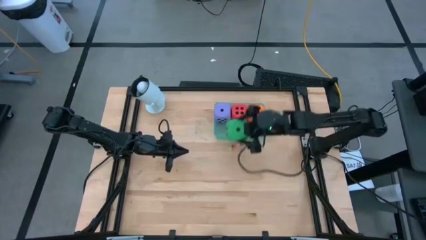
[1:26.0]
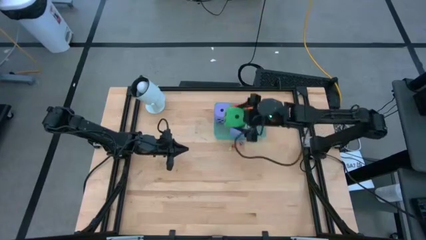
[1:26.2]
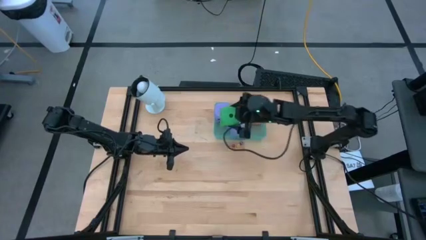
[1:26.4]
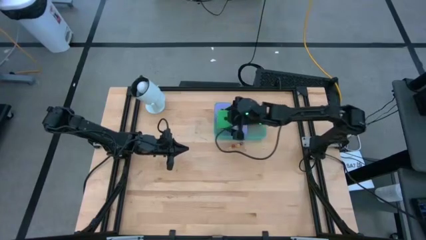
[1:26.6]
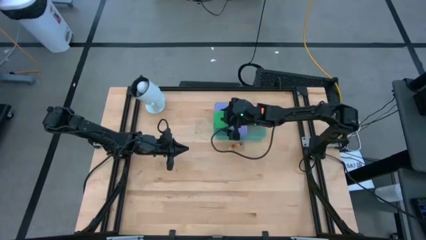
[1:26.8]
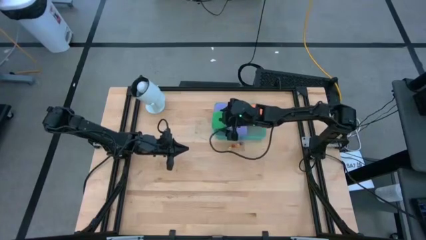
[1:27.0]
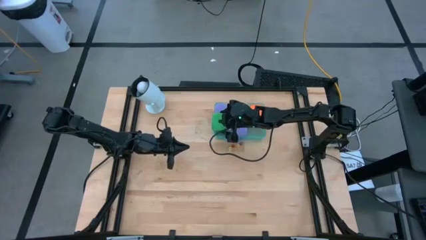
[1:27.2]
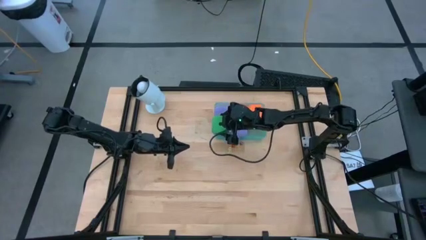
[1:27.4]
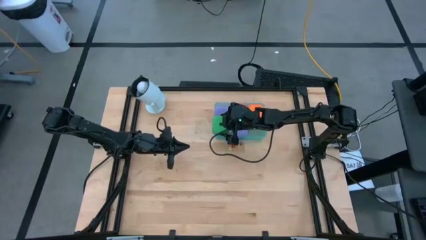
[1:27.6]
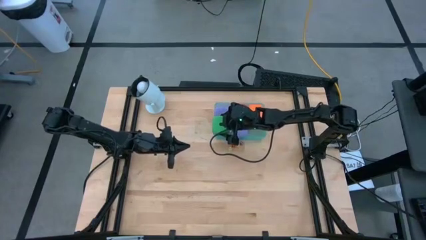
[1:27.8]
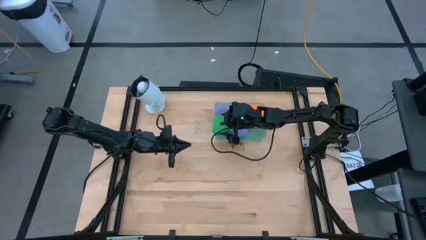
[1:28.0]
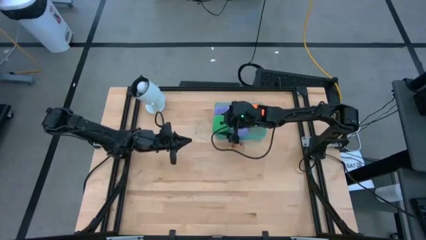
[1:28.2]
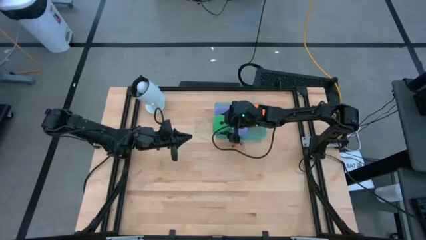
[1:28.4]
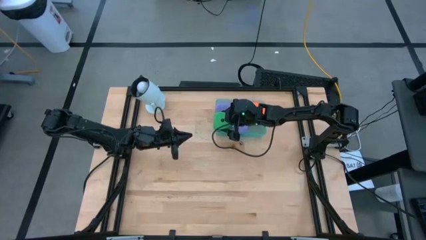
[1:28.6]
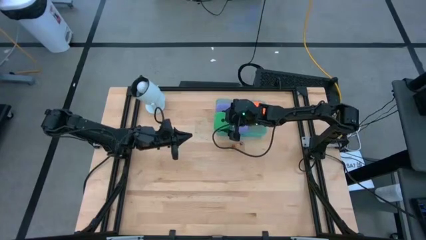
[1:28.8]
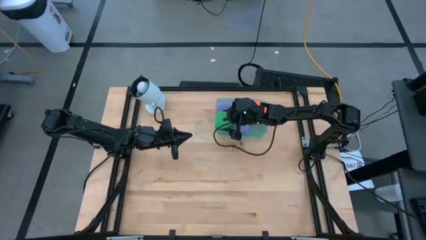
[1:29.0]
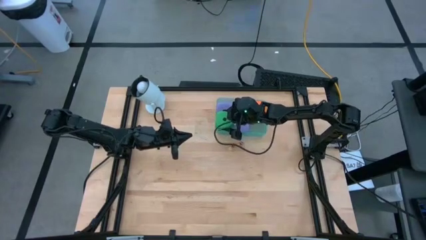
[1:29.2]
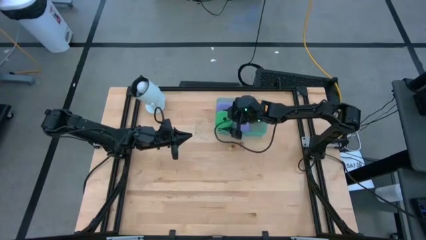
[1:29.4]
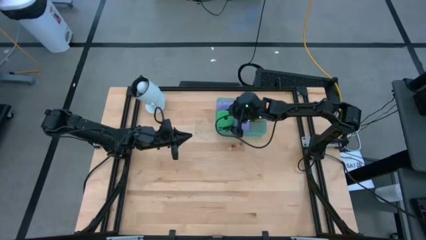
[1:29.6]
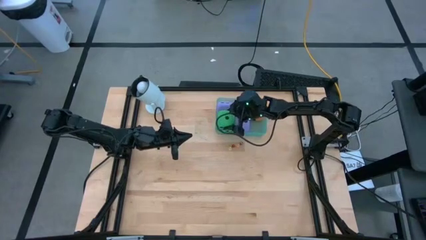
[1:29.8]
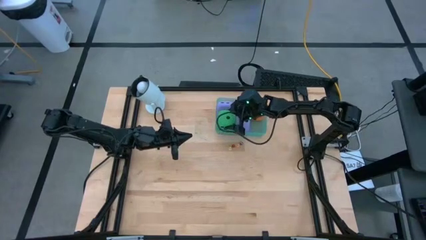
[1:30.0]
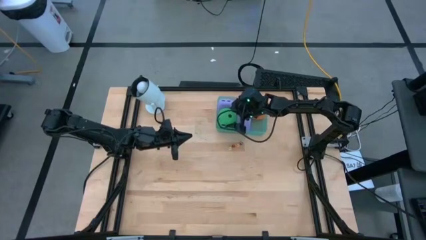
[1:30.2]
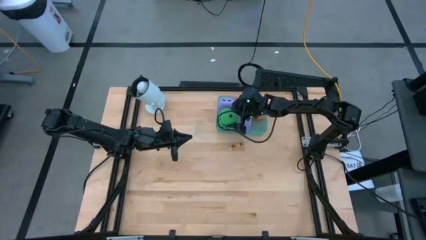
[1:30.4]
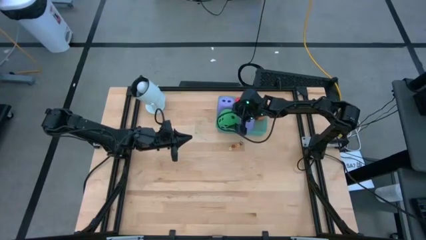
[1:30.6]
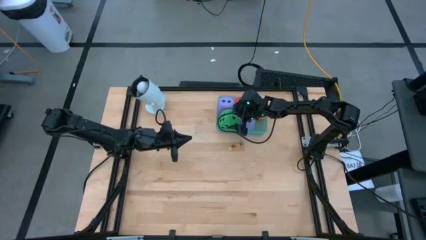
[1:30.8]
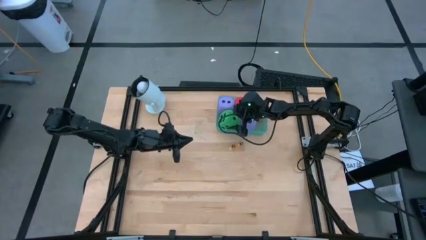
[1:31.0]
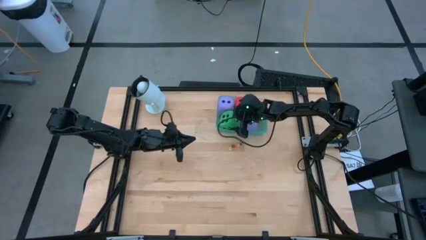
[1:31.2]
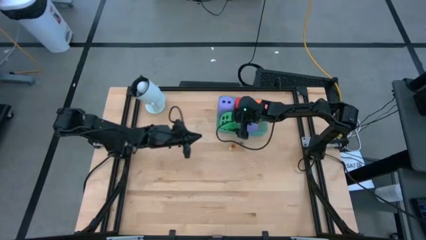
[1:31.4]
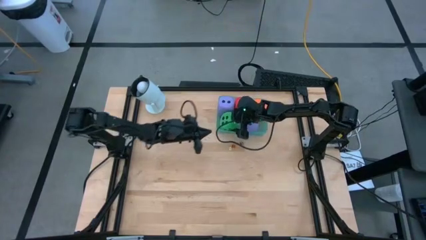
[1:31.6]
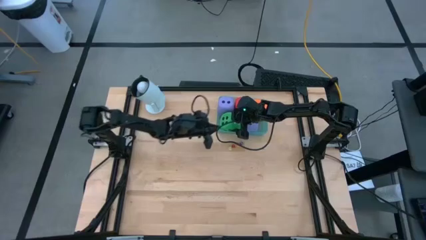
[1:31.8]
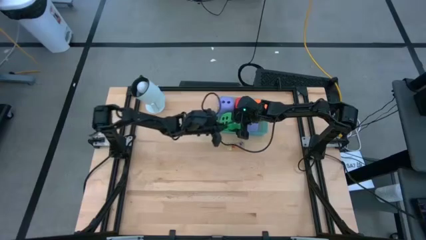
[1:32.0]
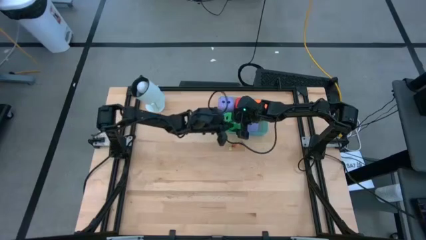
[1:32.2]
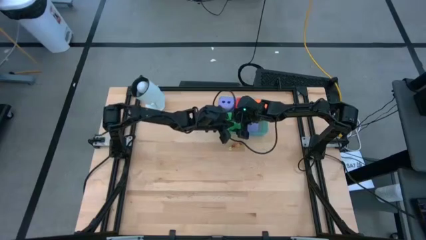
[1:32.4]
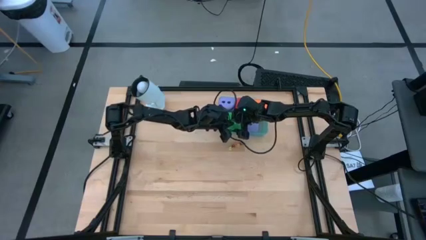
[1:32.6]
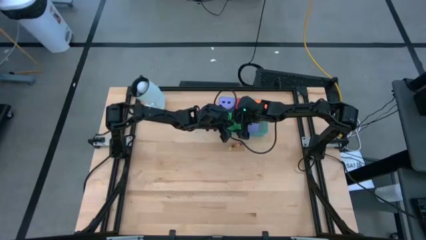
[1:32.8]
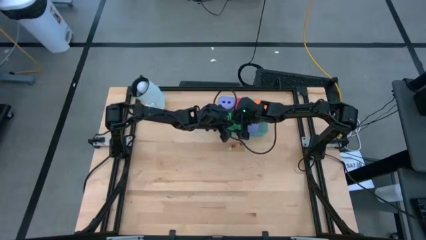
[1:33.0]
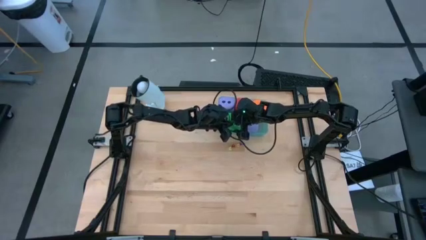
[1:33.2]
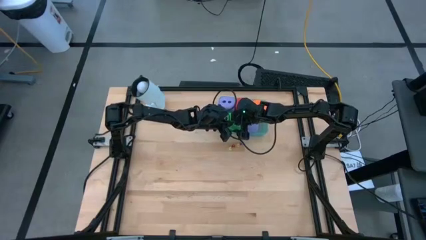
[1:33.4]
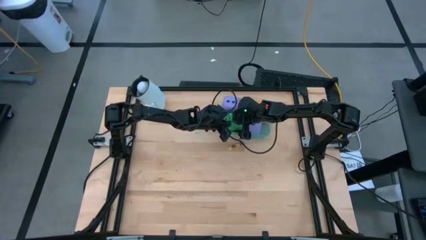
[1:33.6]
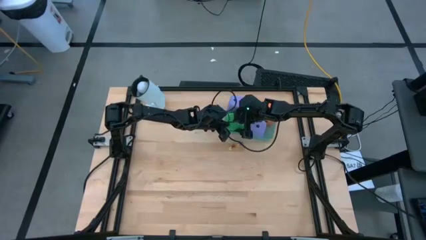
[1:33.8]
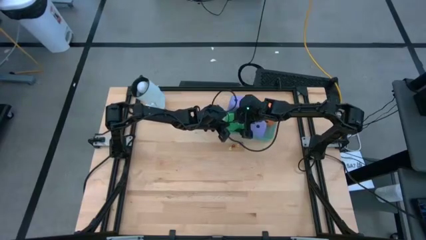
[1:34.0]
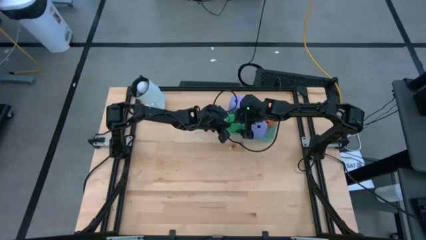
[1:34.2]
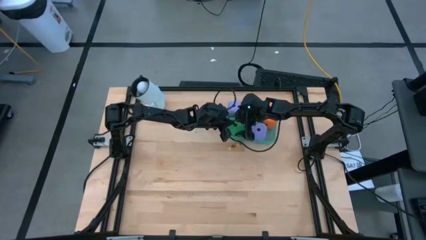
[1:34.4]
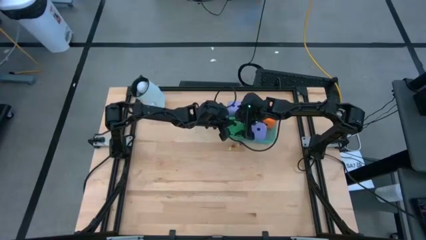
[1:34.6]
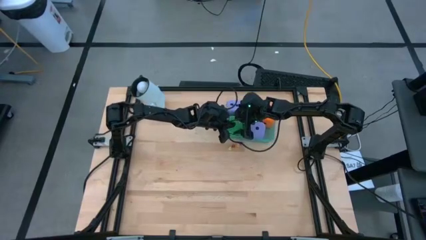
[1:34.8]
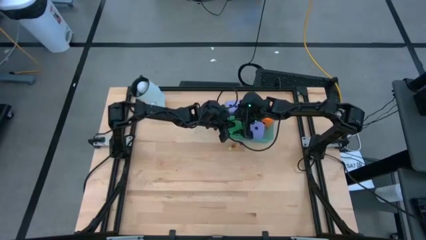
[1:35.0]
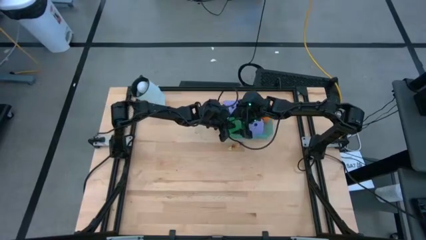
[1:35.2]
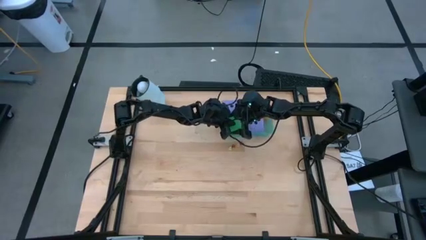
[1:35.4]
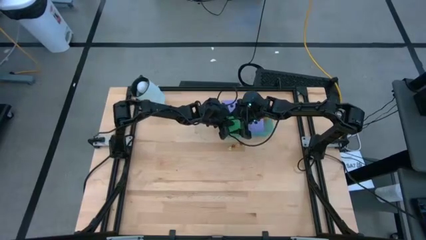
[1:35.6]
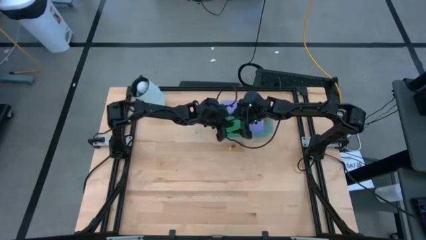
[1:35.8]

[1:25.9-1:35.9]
Task: Pick & Place Dice
Put the big green dice into the transparent blue bin

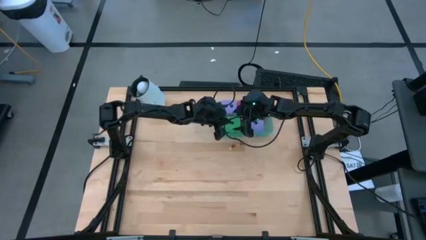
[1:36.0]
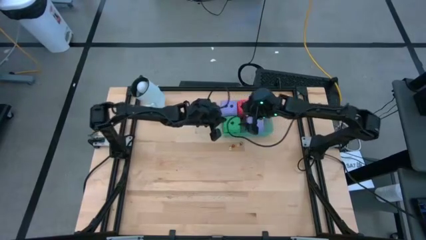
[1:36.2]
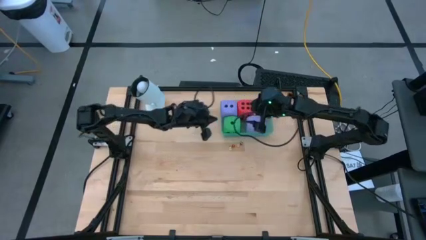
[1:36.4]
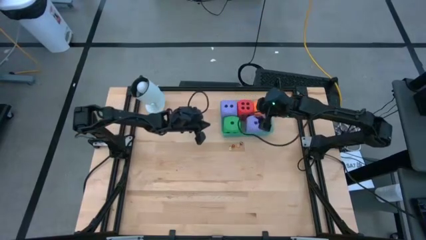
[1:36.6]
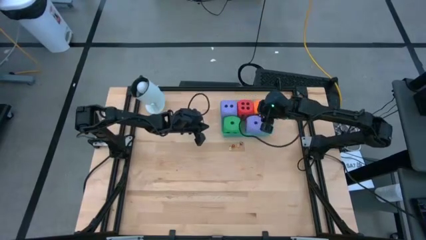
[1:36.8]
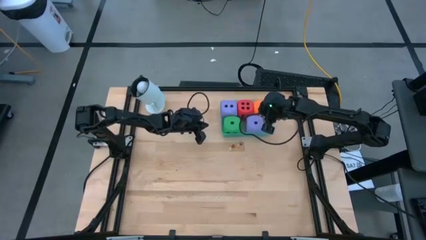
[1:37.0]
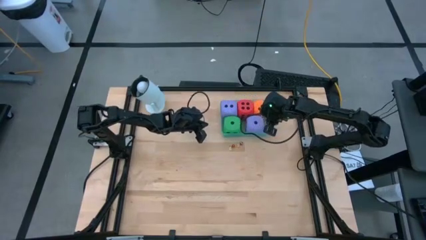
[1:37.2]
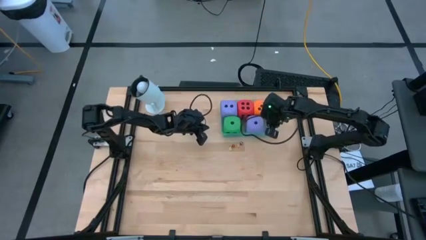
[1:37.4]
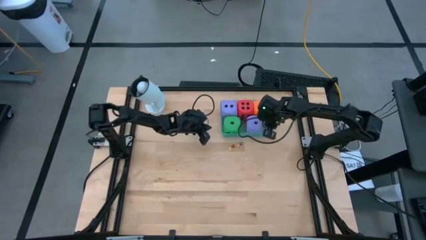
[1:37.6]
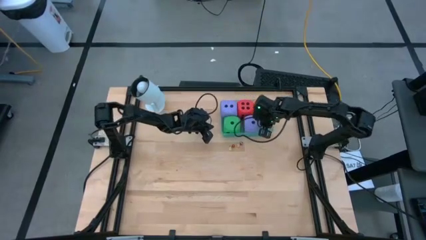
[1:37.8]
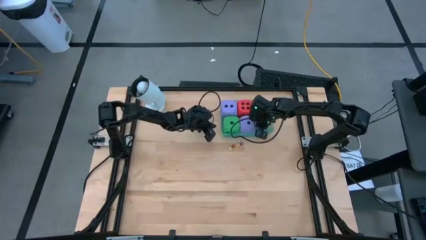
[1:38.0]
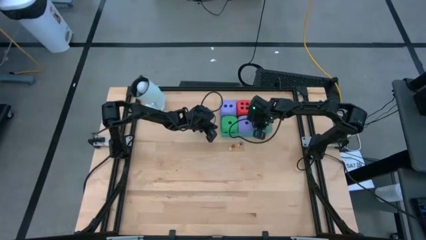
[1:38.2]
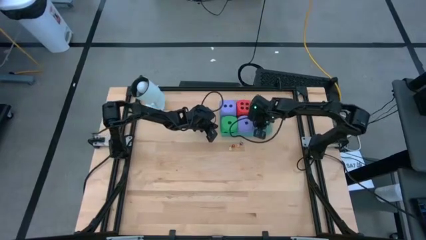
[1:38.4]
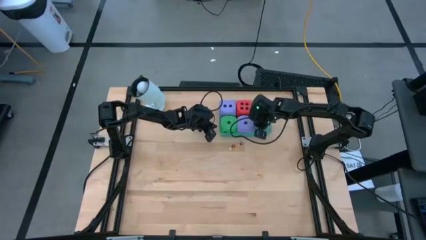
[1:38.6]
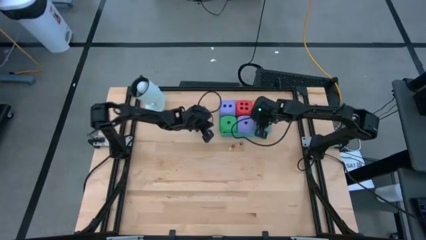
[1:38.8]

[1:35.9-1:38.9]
Adjust the big violet dice and transparent blue bin

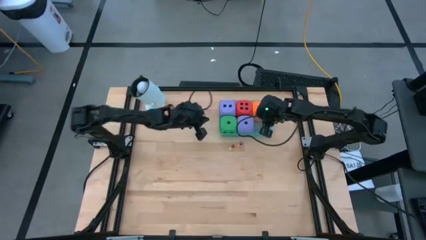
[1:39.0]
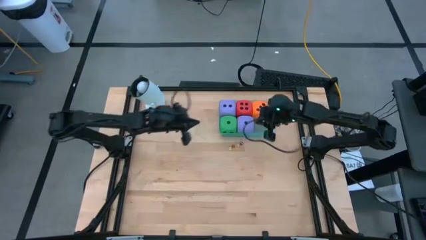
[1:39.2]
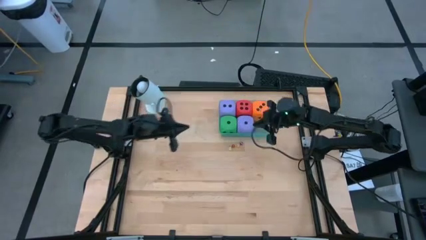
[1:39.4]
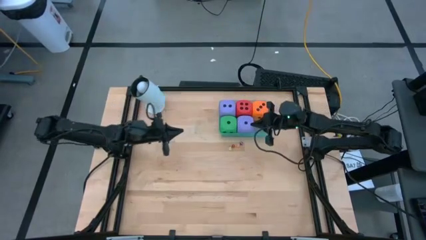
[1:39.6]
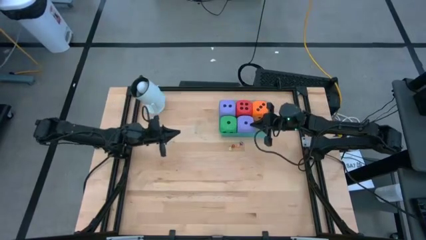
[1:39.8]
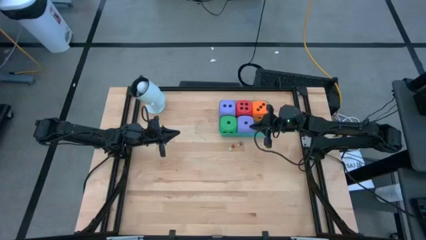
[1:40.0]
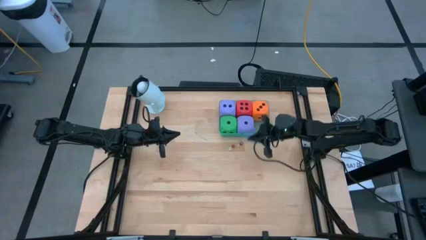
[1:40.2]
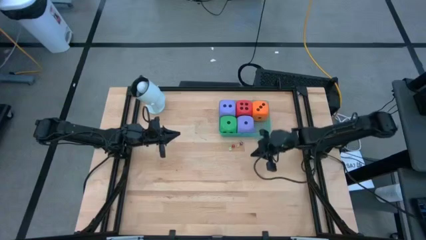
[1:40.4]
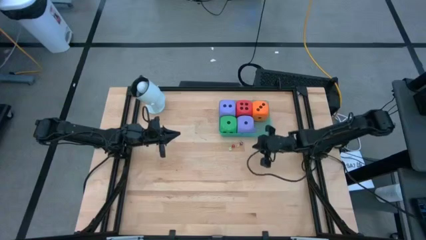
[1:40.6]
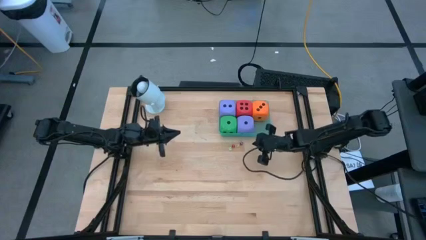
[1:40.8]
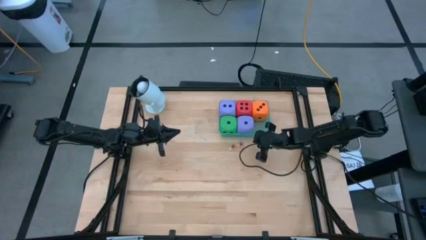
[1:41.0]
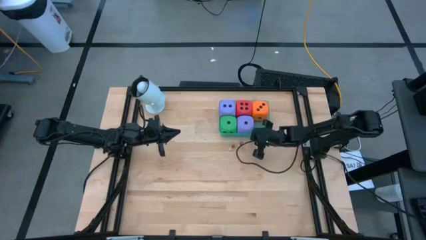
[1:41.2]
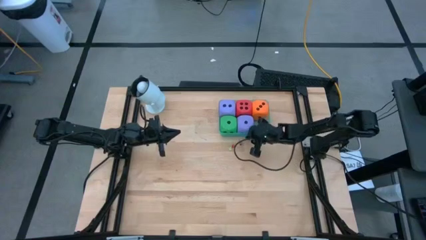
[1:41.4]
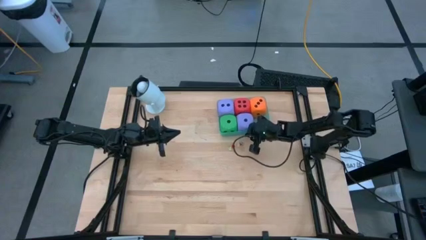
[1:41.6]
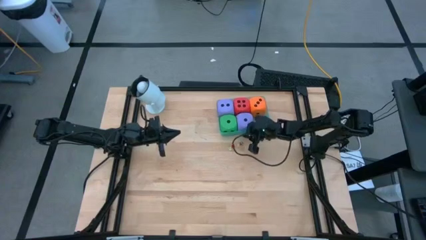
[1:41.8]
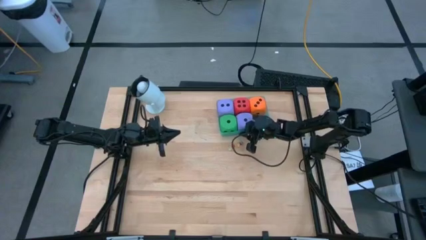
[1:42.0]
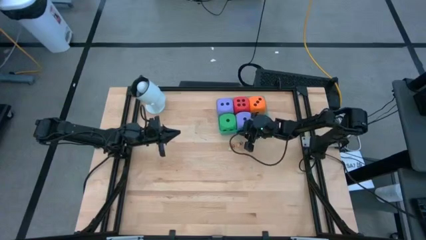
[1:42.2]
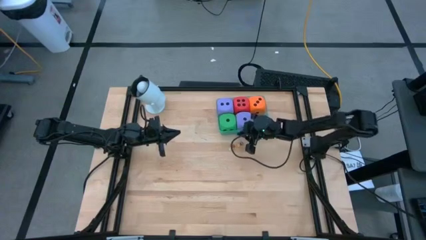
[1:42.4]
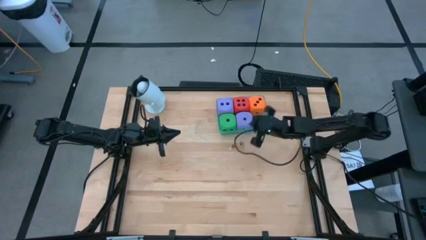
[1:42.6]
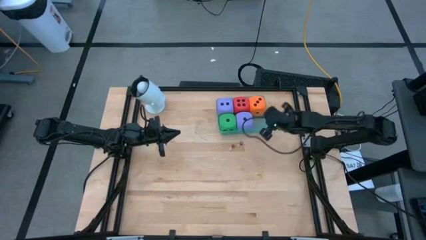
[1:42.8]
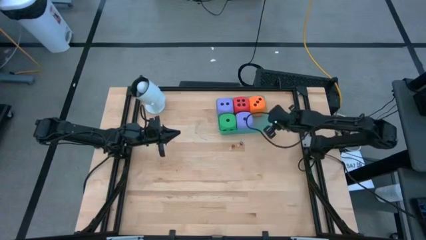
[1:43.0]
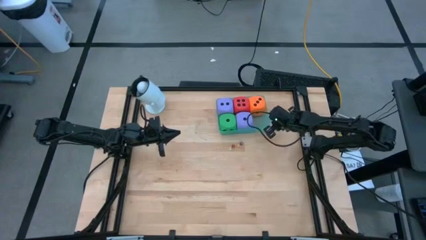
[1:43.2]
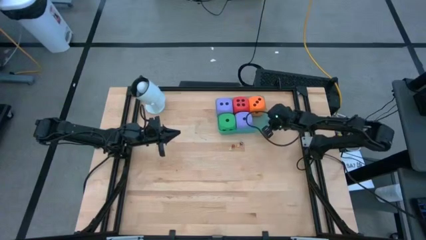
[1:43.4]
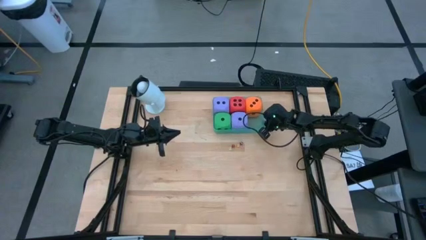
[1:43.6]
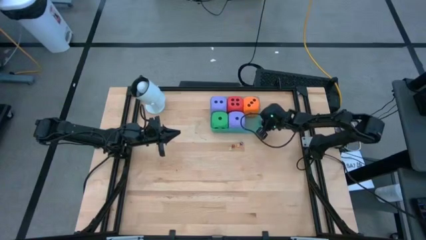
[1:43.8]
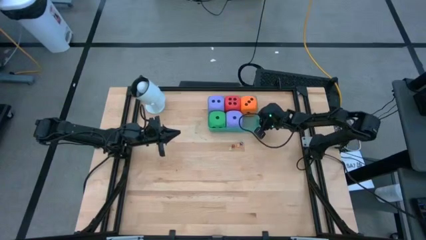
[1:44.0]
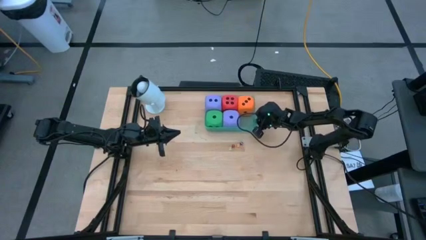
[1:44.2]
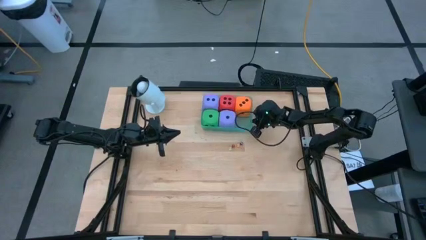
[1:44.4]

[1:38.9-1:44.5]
Adjust the transparent blue bin
